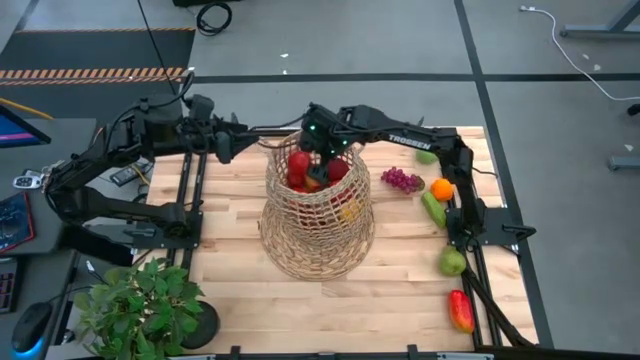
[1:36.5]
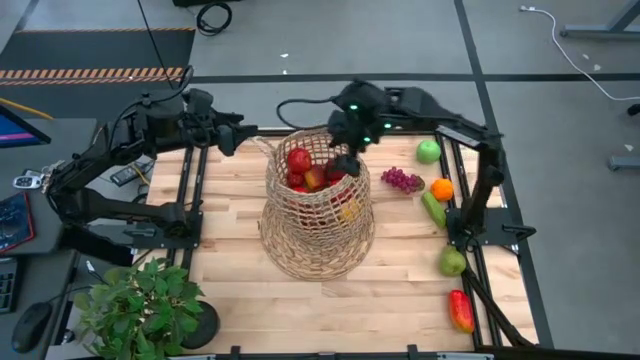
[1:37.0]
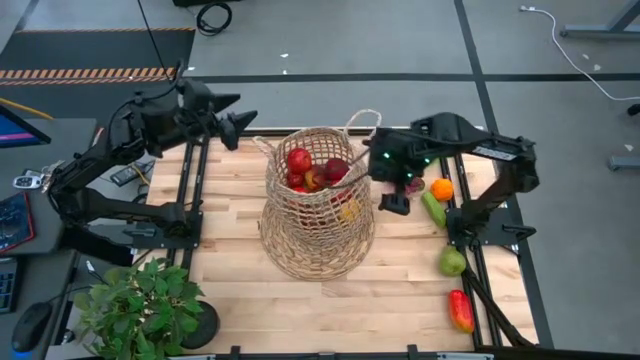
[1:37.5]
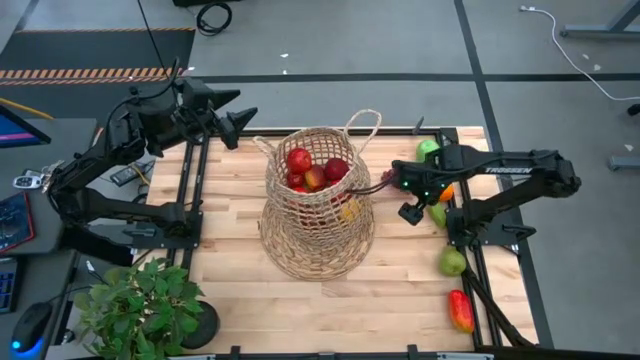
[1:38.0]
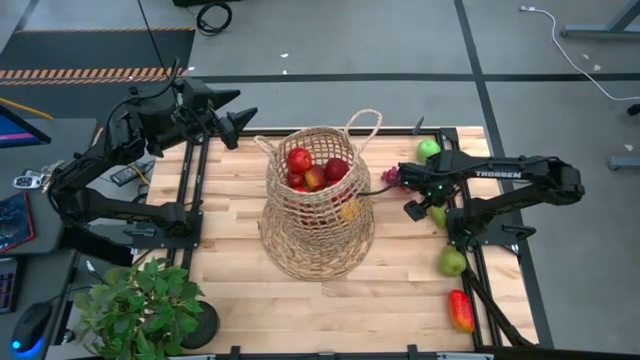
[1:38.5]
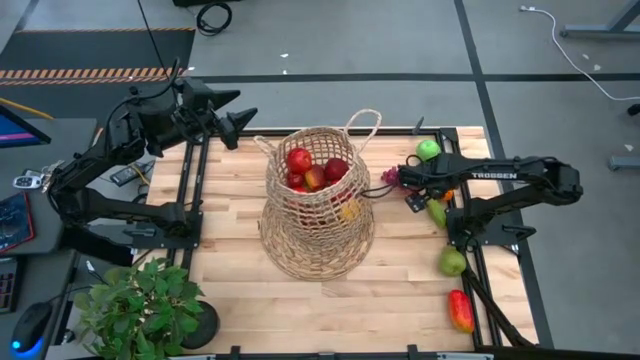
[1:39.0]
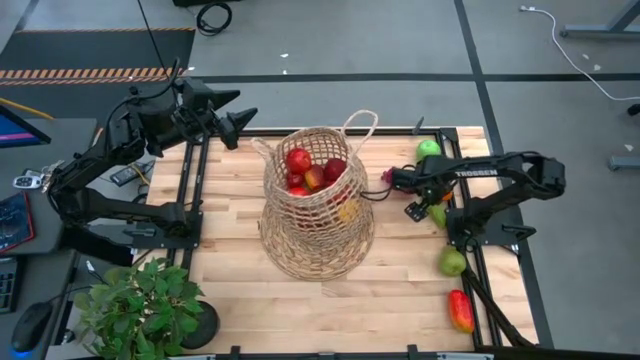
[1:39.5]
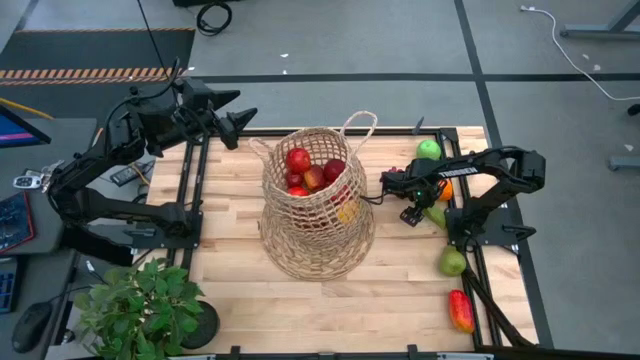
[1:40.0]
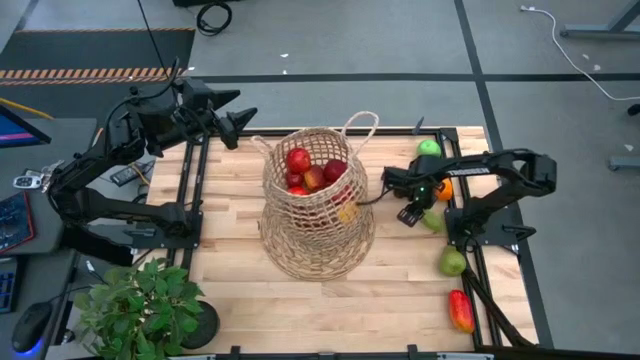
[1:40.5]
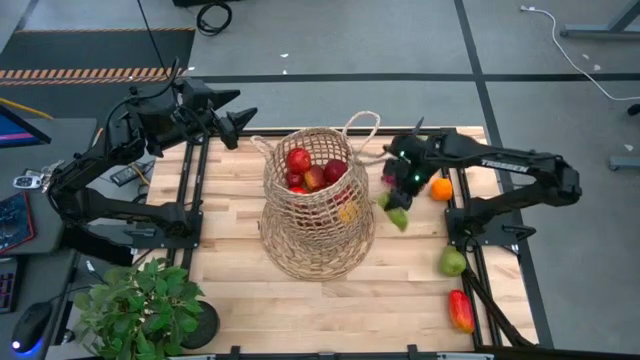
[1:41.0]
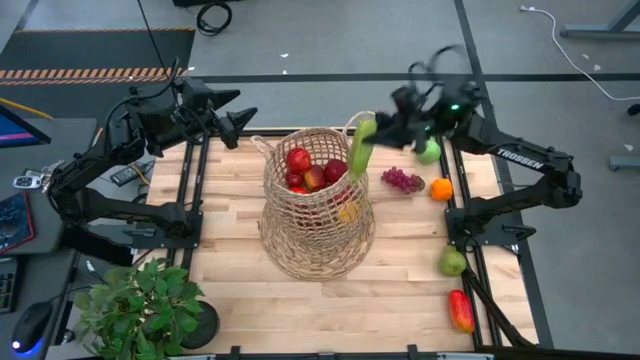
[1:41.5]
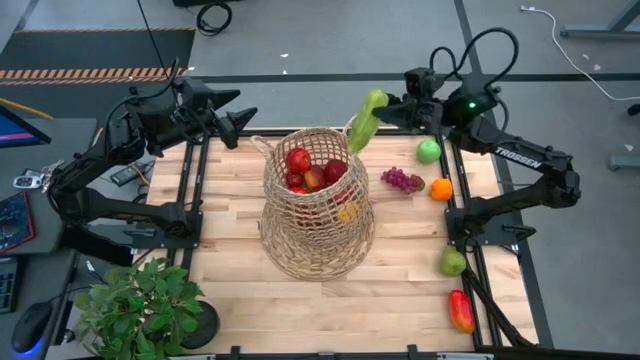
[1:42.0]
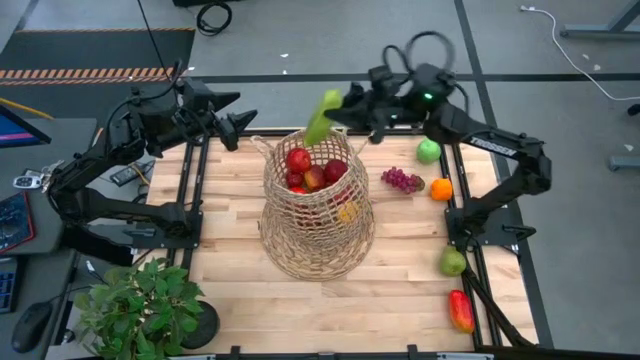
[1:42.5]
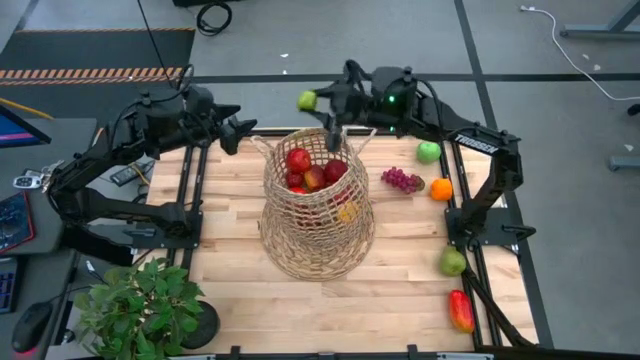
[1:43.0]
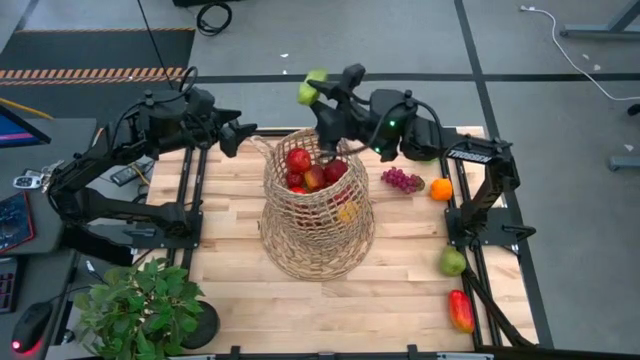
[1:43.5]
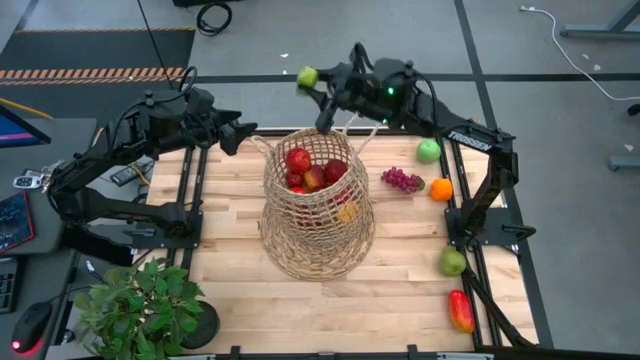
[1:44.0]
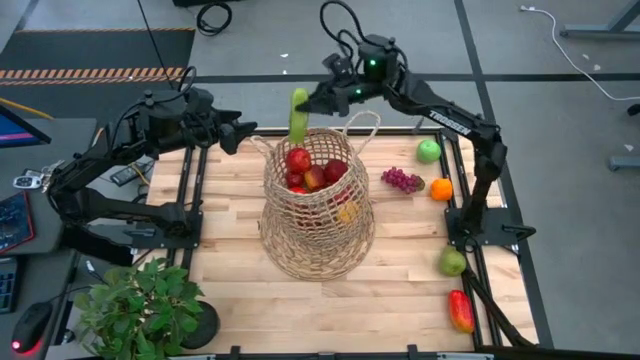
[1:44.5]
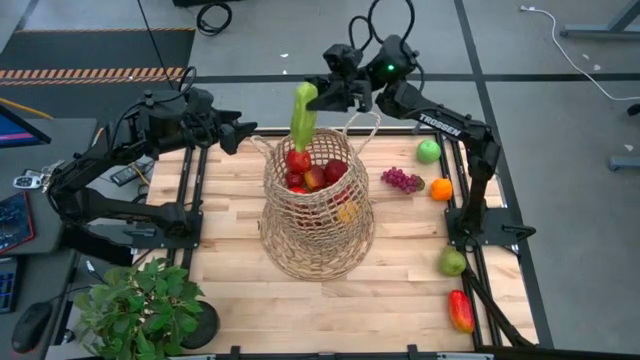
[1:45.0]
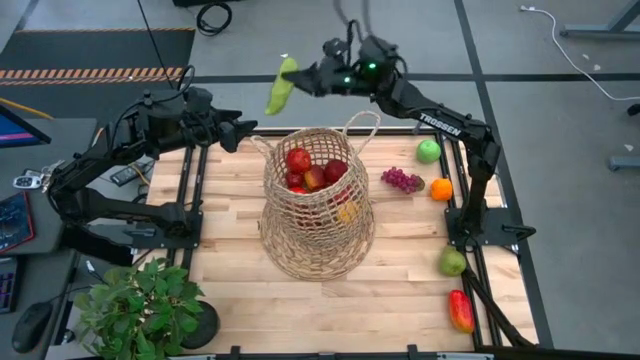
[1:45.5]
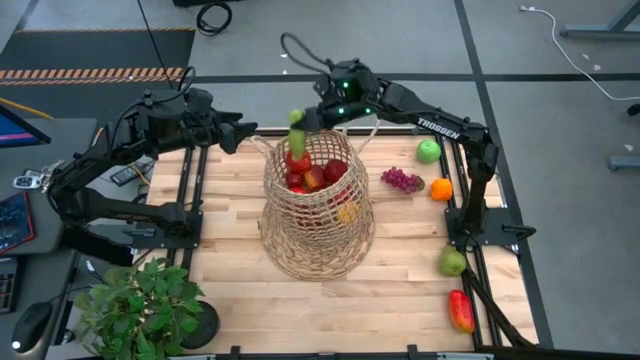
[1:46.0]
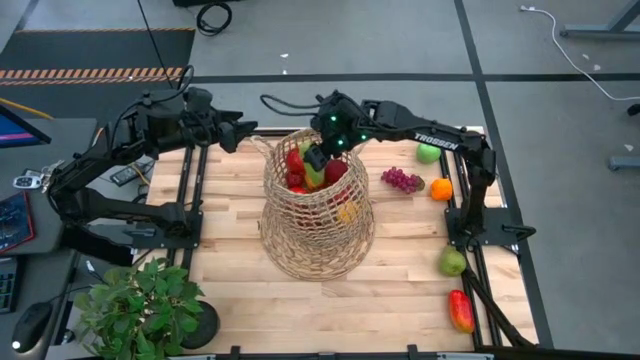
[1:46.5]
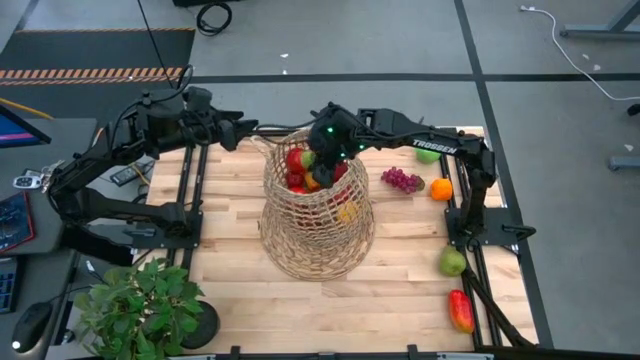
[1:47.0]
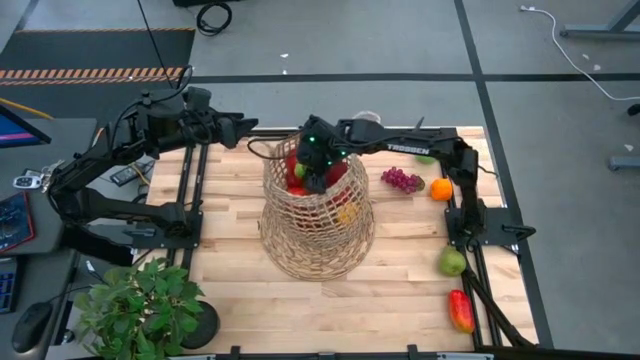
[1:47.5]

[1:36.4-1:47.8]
Task: Build produce basket
Put the cucumber into the brown basket

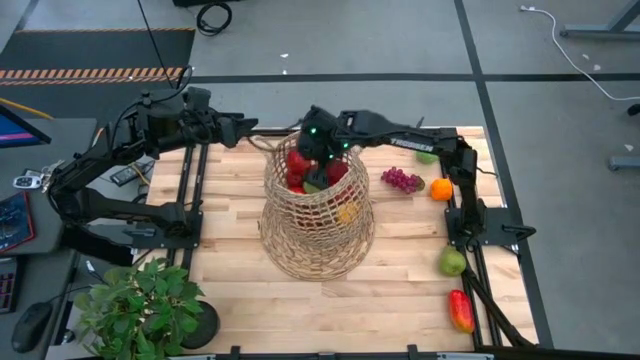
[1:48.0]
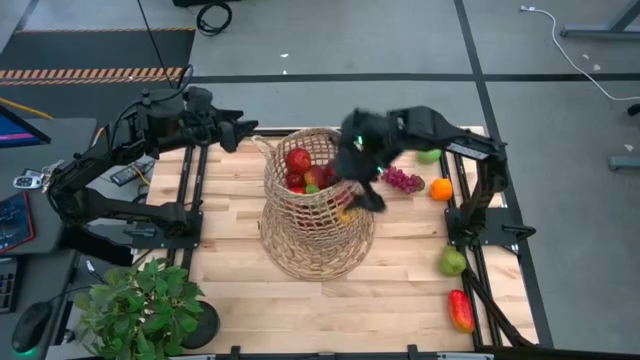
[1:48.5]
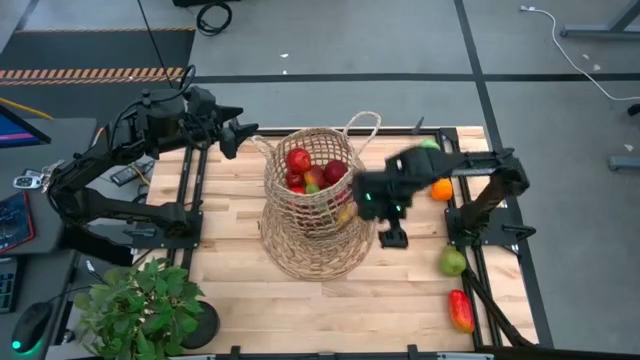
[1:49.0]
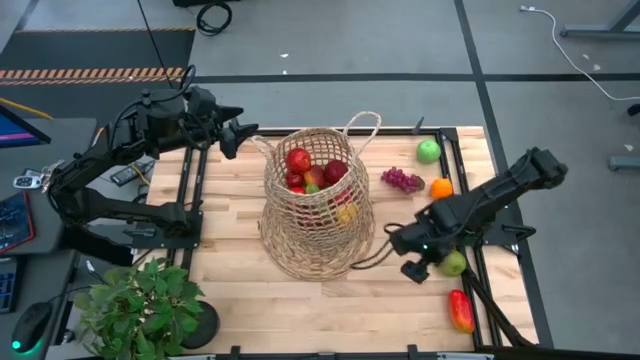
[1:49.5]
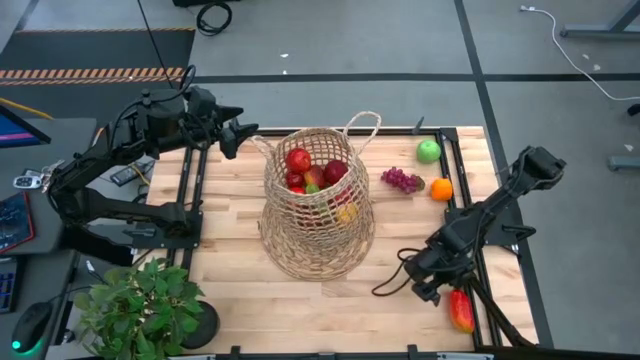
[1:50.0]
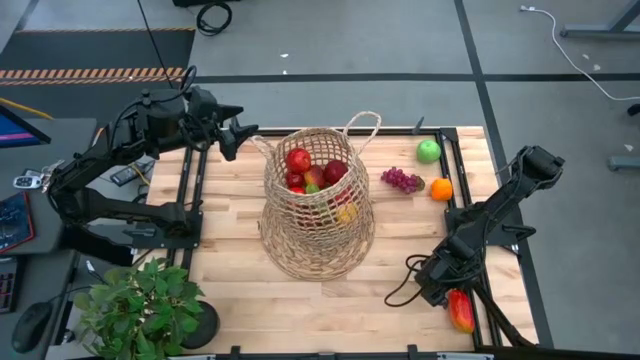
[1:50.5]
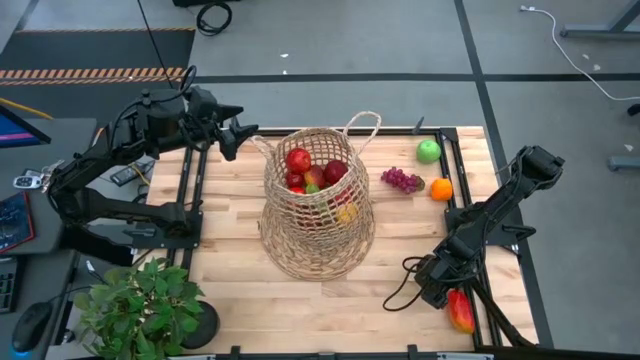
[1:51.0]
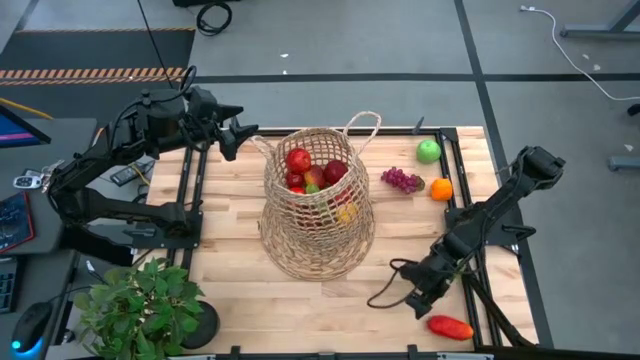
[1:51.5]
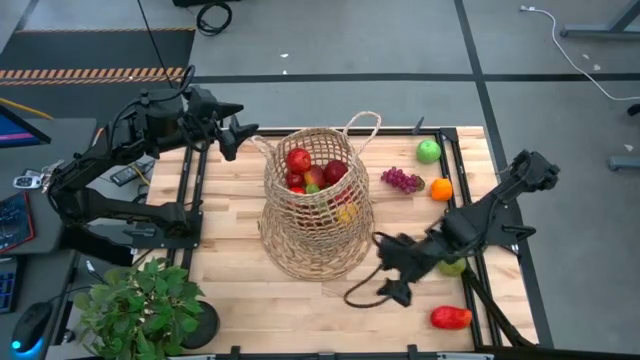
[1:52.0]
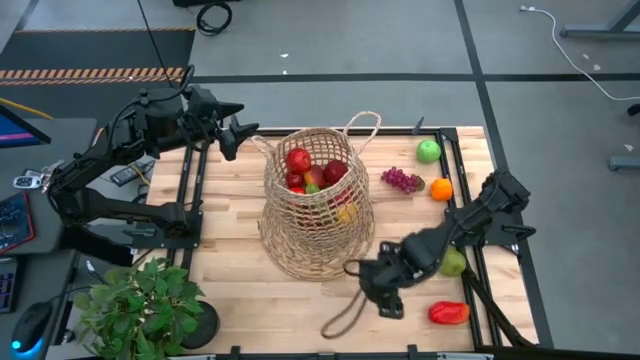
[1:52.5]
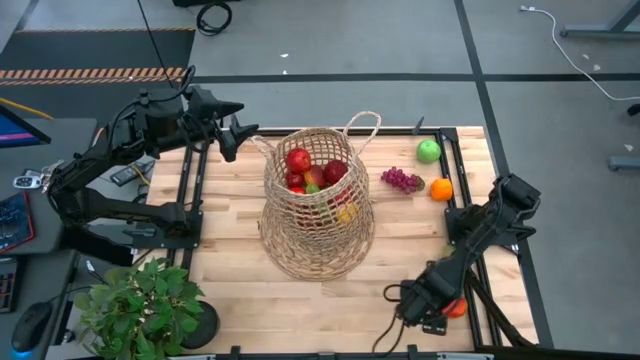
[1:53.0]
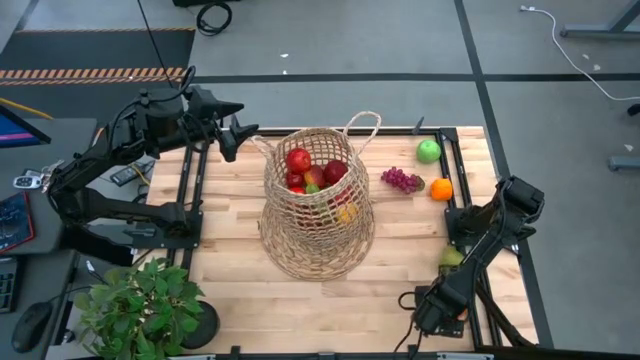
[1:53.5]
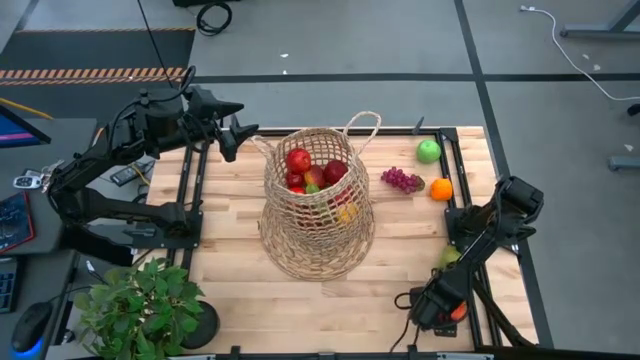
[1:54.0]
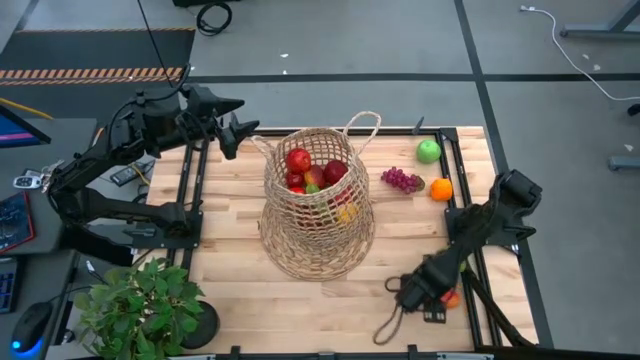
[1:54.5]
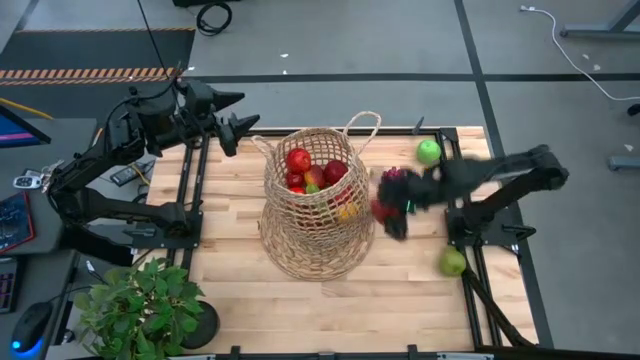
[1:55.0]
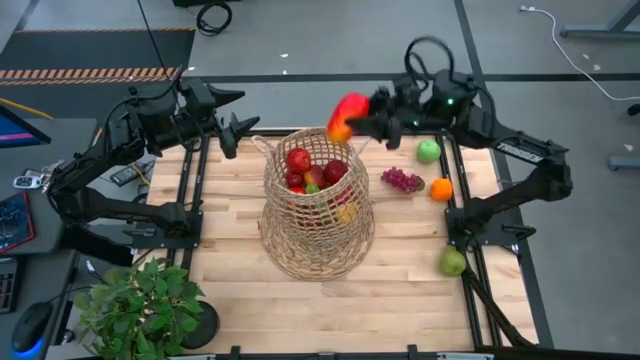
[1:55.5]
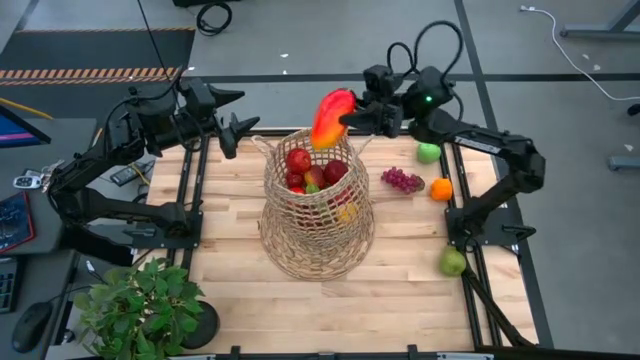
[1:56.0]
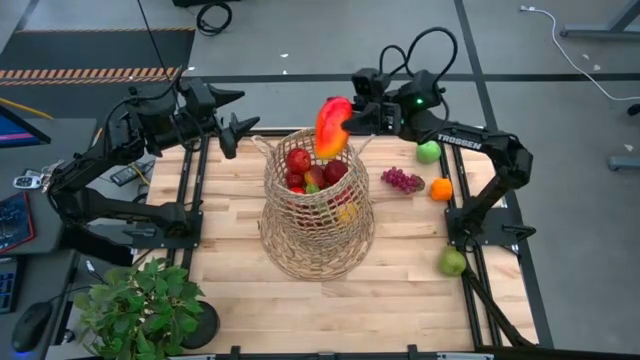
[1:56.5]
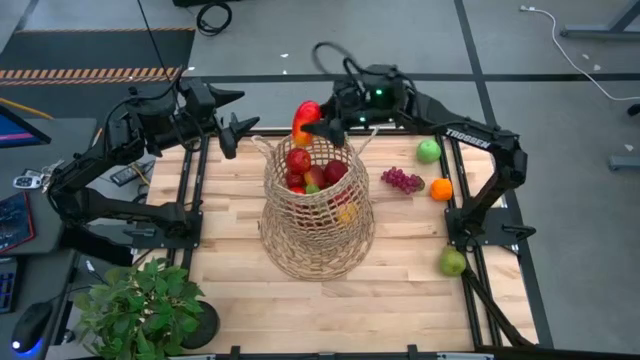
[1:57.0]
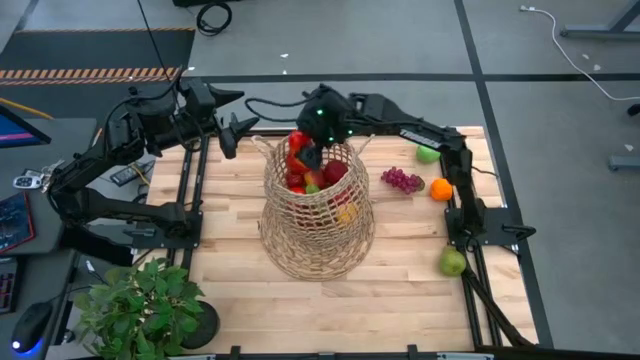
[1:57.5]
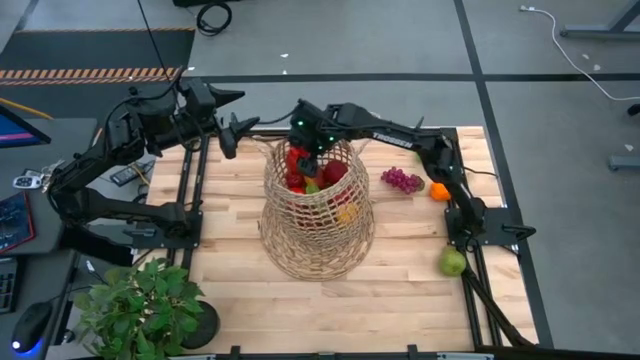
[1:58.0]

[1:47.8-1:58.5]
Put the mango into the brown basket
